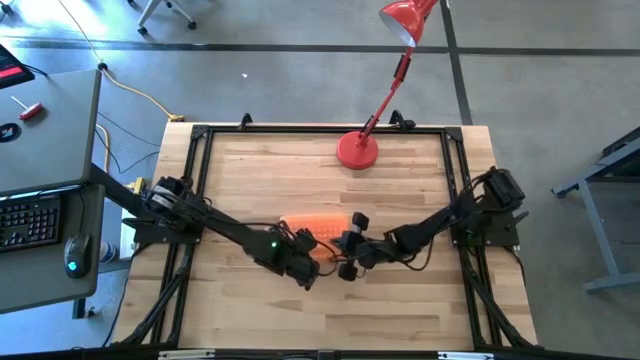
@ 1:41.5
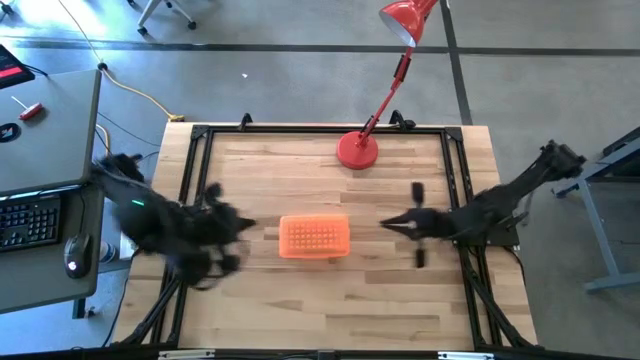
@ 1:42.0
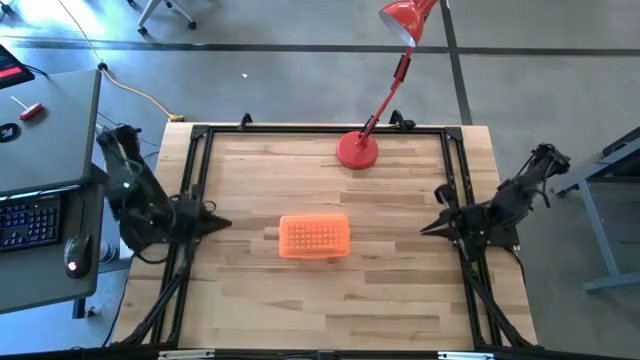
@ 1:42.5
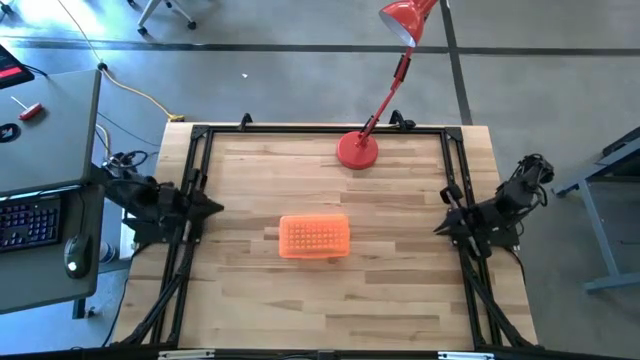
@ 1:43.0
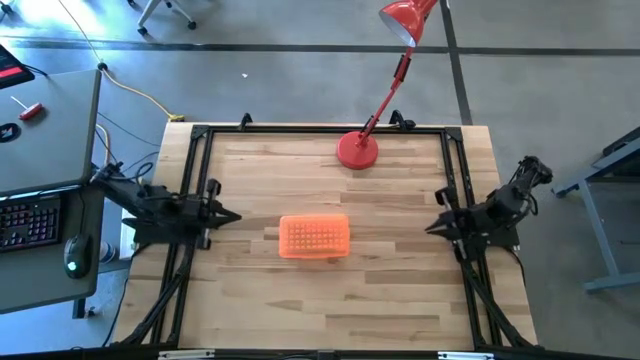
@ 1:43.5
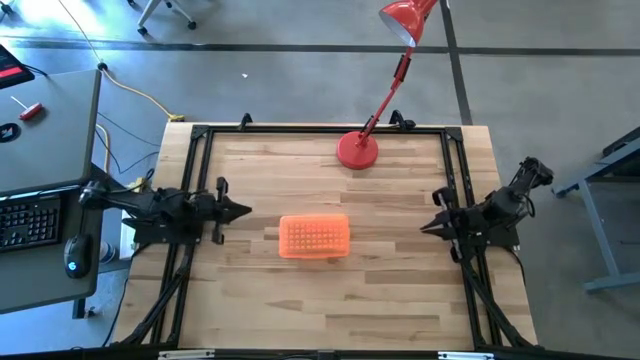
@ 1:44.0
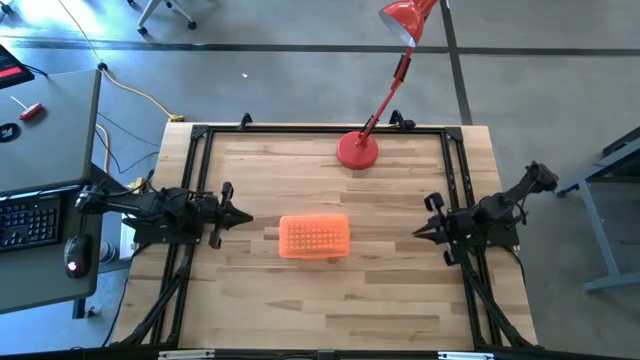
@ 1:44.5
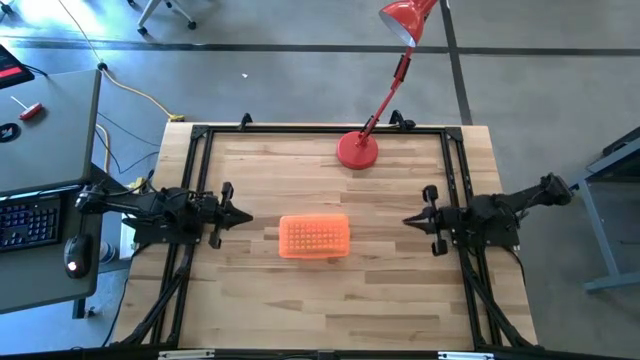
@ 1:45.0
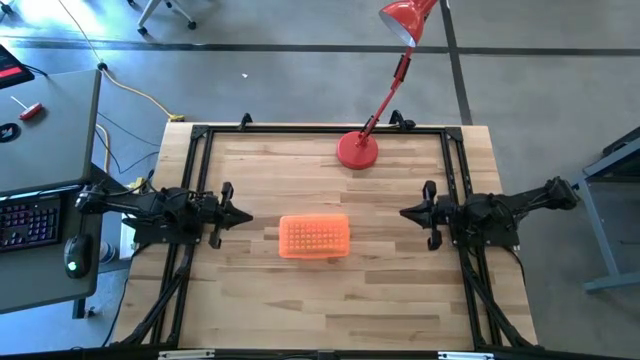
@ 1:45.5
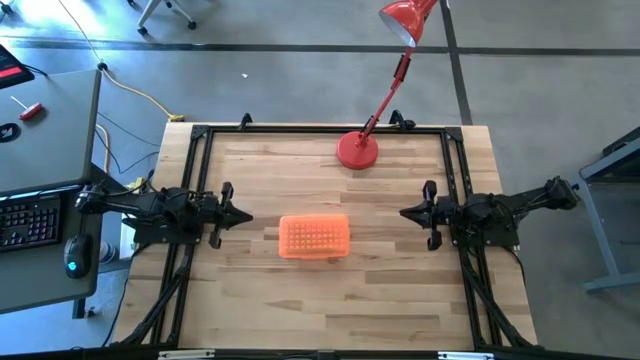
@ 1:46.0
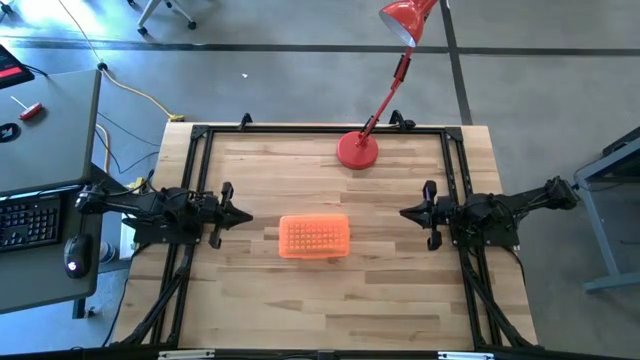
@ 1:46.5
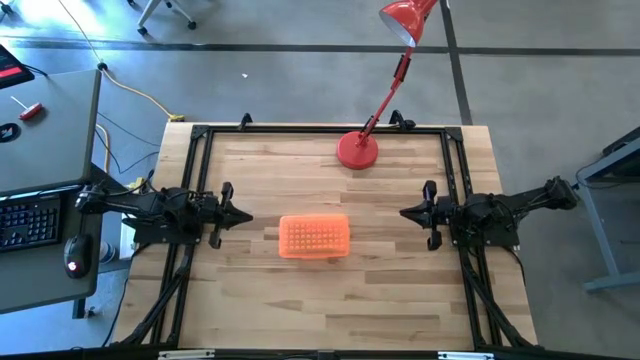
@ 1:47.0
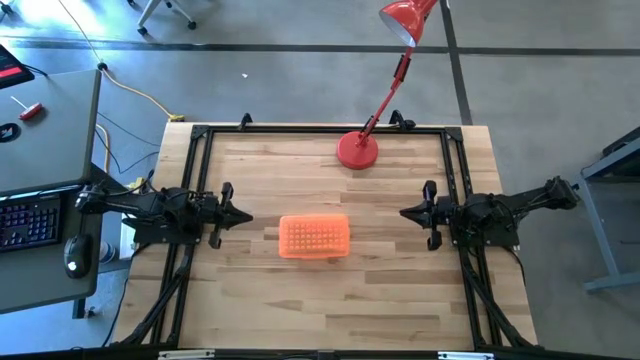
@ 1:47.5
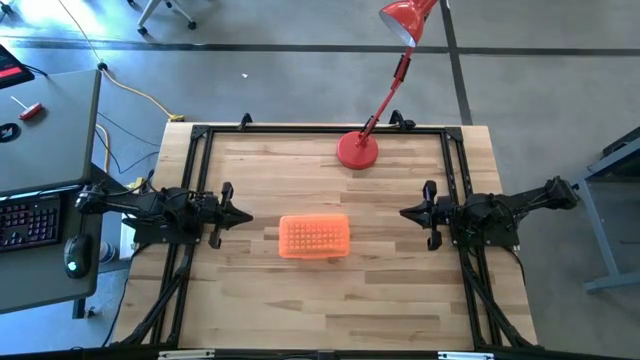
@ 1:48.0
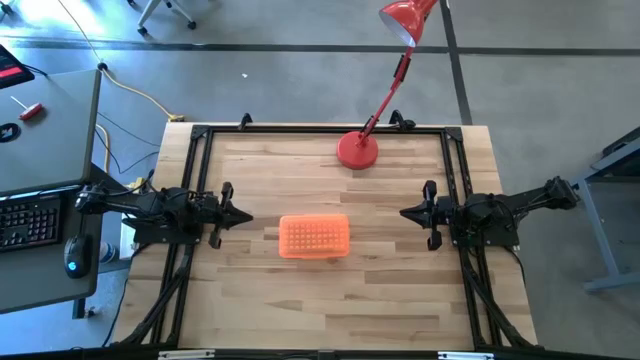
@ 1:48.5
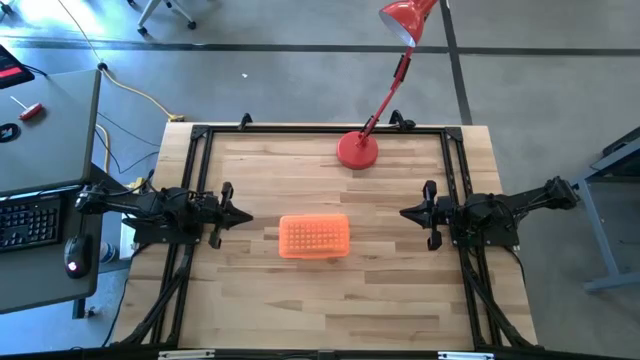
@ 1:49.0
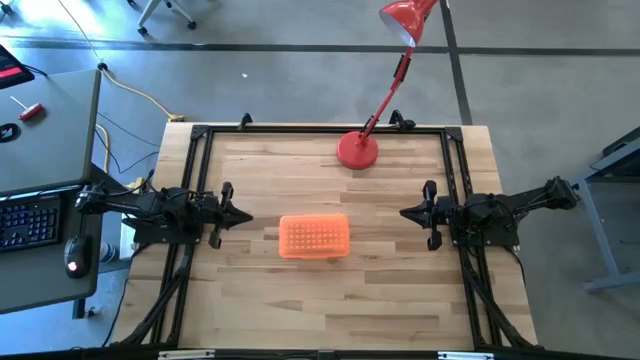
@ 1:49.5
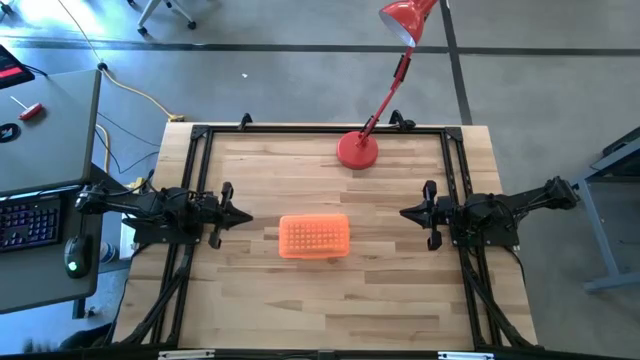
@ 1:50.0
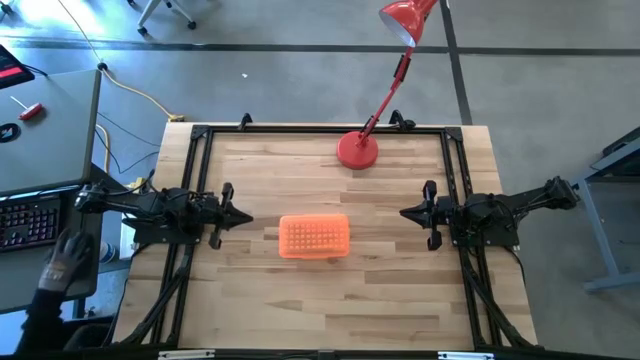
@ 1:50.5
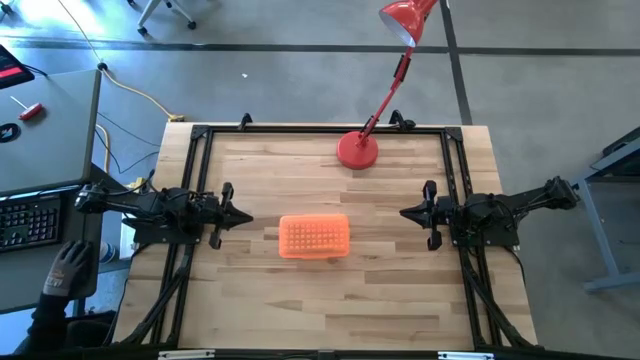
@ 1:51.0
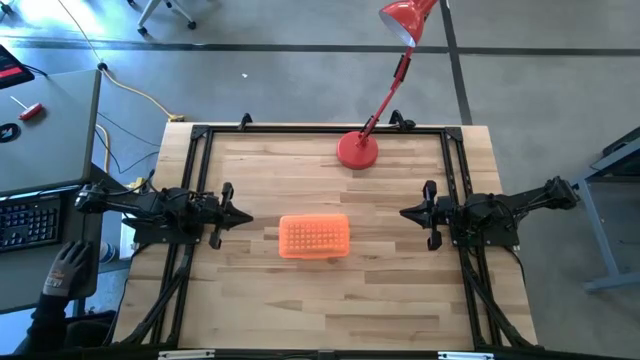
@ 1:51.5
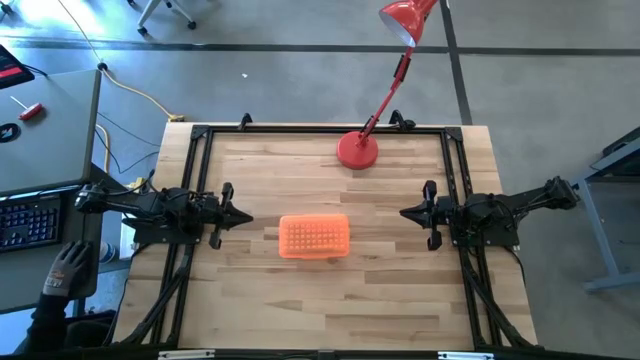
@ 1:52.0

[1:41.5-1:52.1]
Task: Pick & place school supplies into a supply box
Return to Home Position

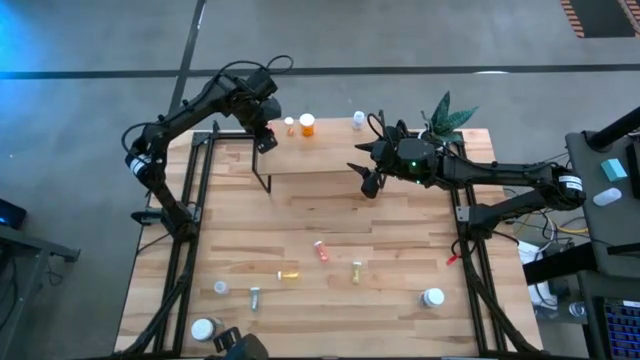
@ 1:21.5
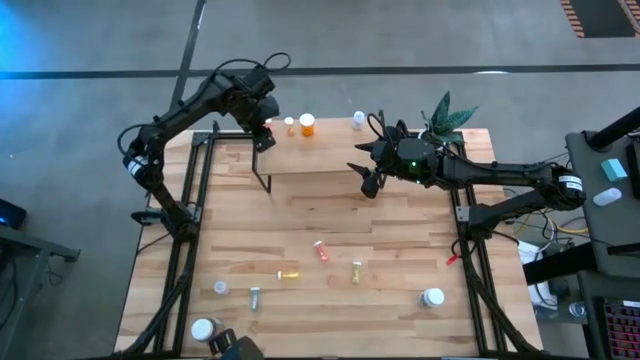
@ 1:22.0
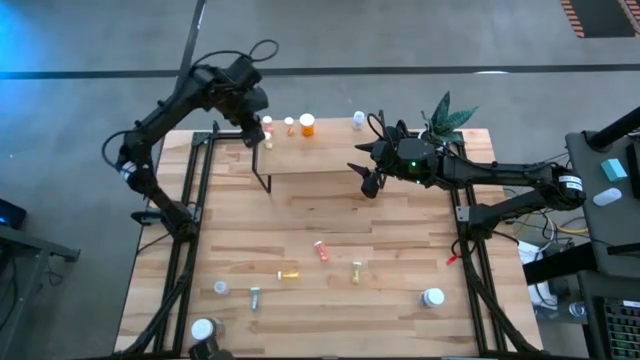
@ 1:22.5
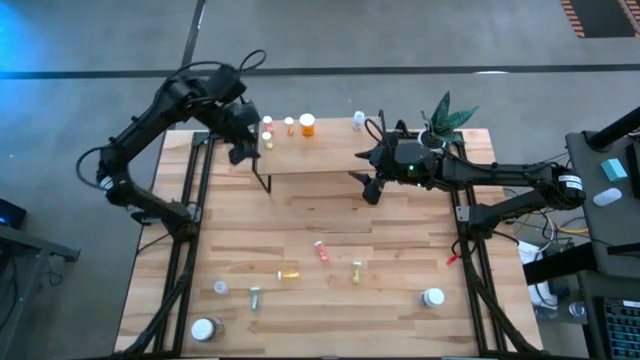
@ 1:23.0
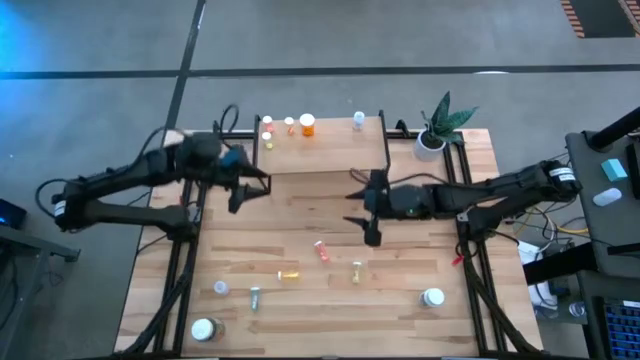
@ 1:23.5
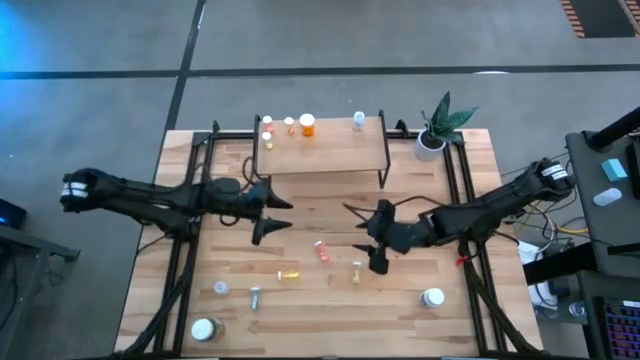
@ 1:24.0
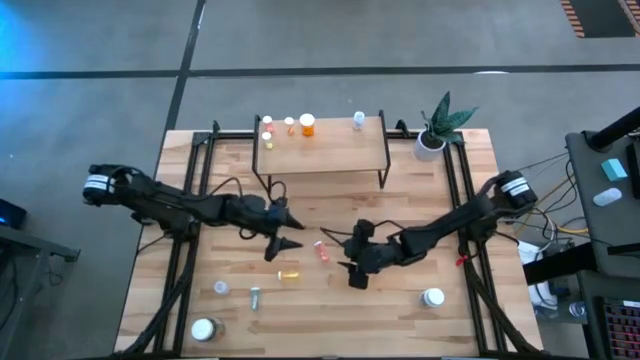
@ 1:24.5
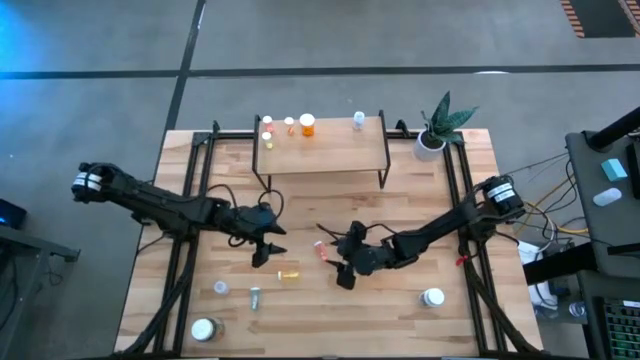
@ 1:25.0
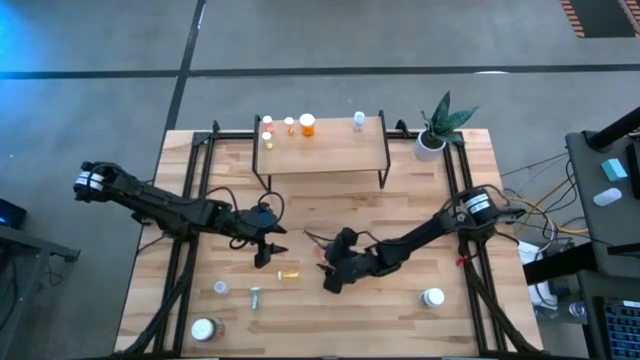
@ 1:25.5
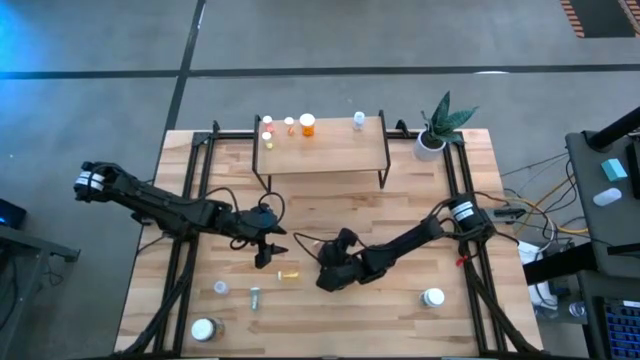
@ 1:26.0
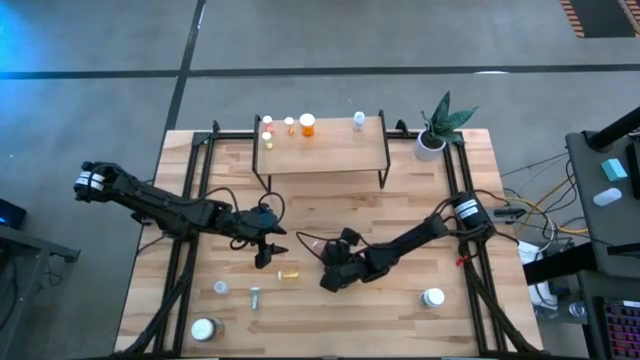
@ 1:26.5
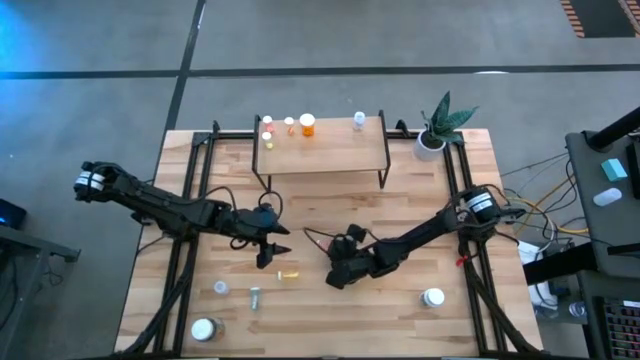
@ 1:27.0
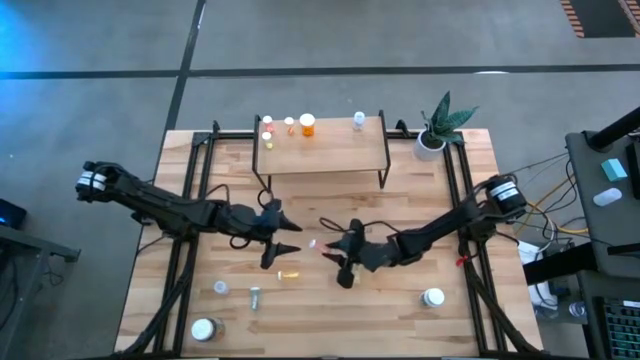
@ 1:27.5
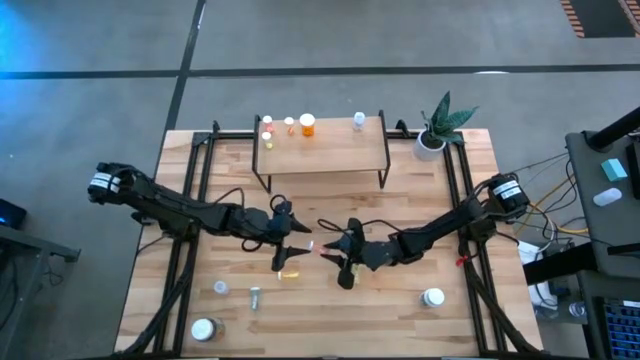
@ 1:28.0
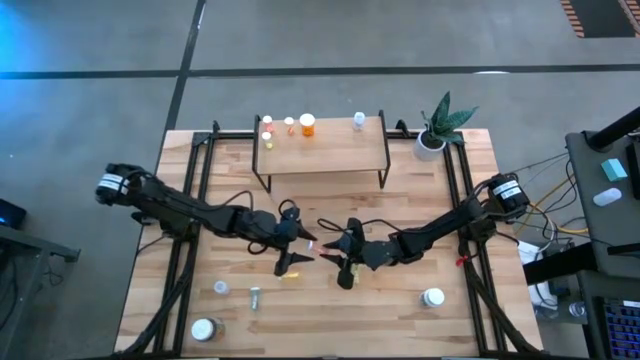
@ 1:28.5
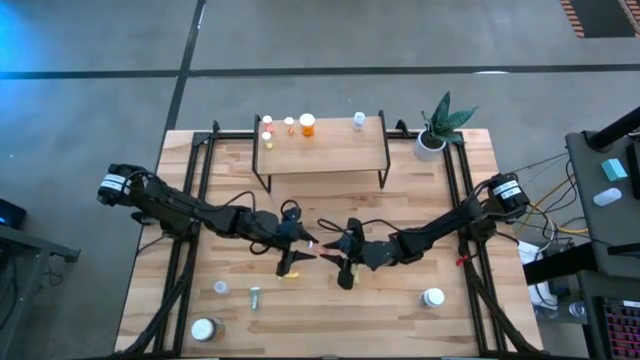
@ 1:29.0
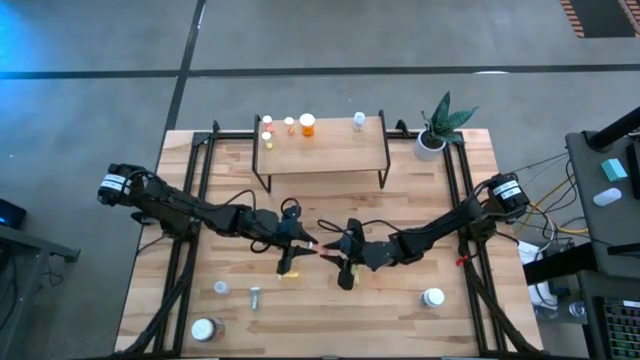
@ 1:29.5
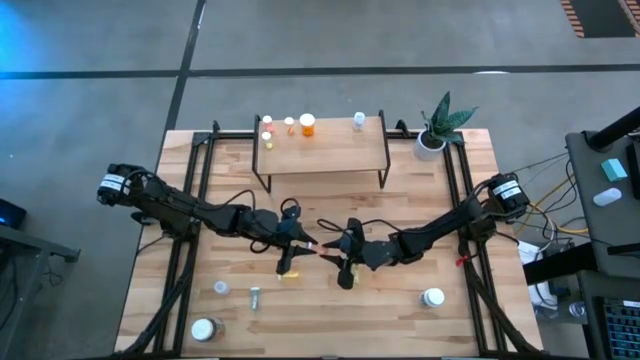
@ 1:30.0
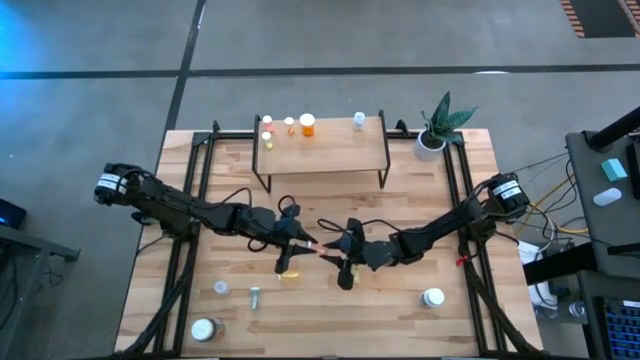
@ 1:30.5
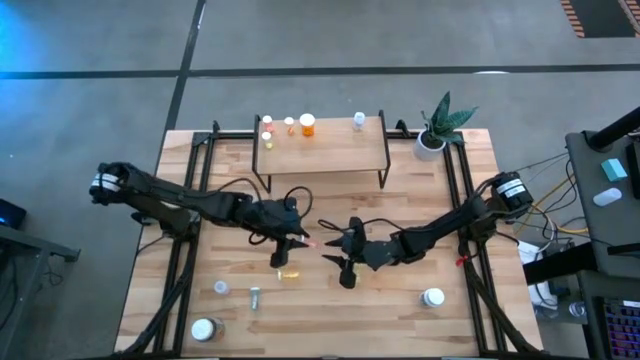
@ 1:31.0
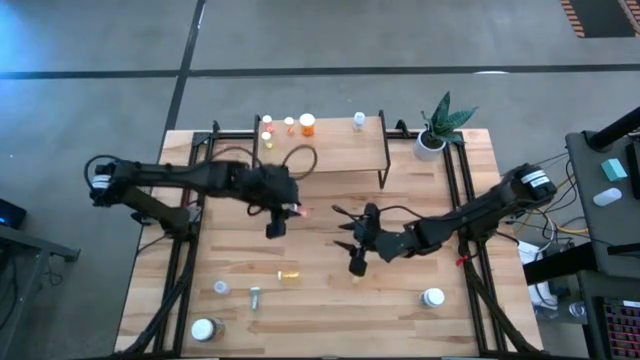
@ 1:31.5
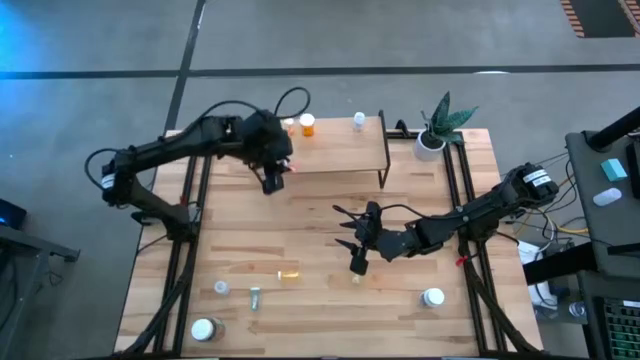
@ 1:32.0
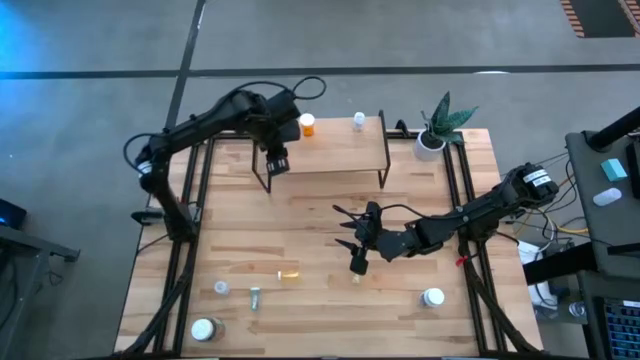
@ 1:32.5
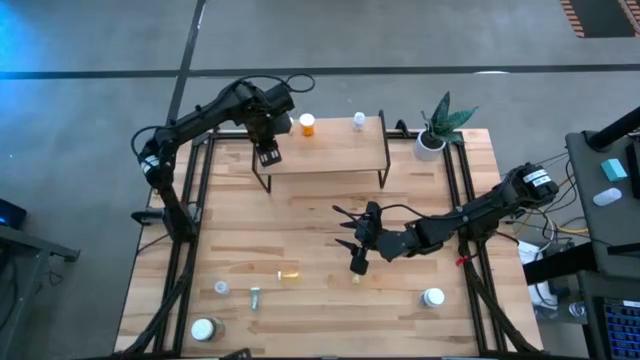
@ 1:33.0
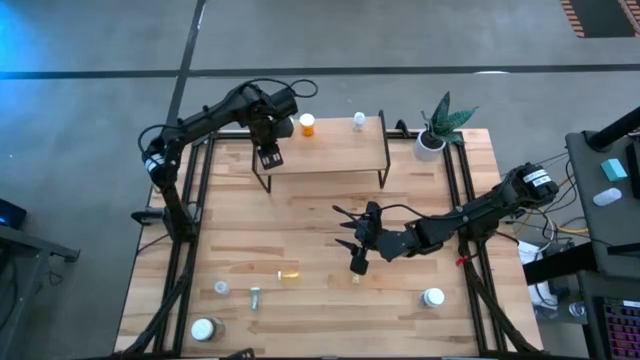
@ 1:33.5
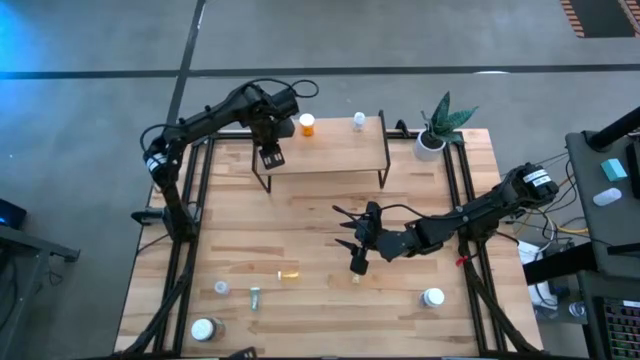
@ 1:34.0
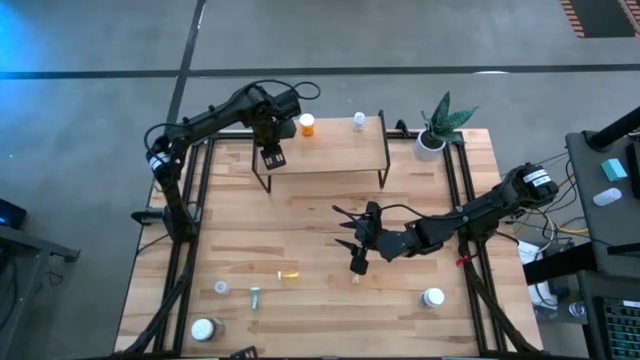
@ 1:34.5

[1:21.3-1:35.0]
Task: Pick and place medicine bottles onto shelf by color
Put the pink pill bottle on the shelf
